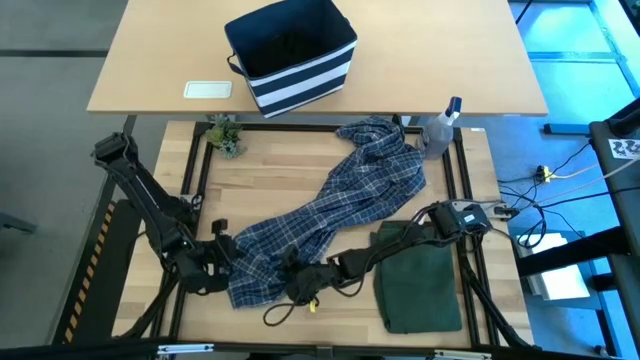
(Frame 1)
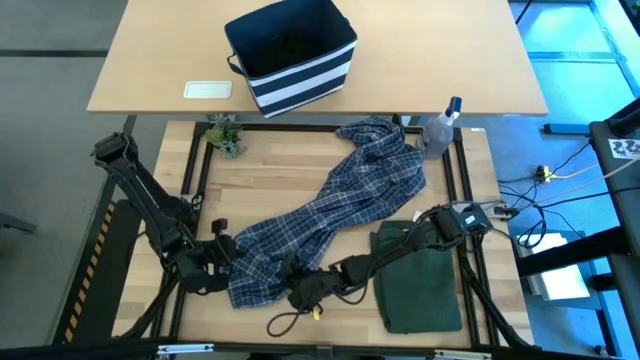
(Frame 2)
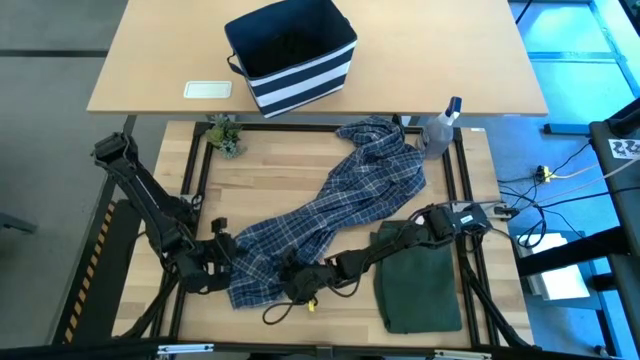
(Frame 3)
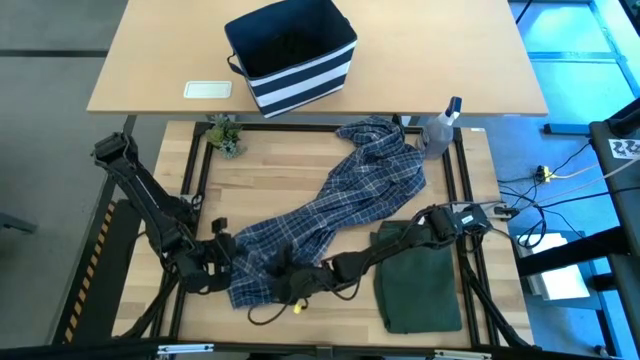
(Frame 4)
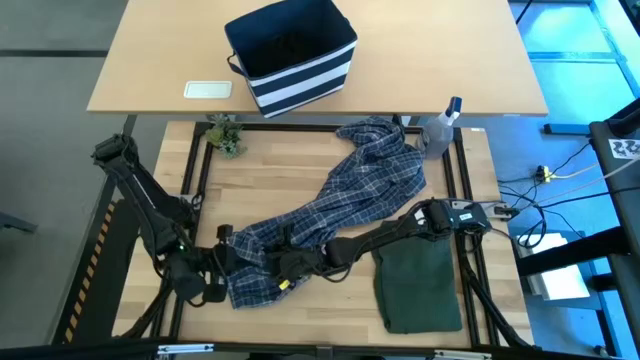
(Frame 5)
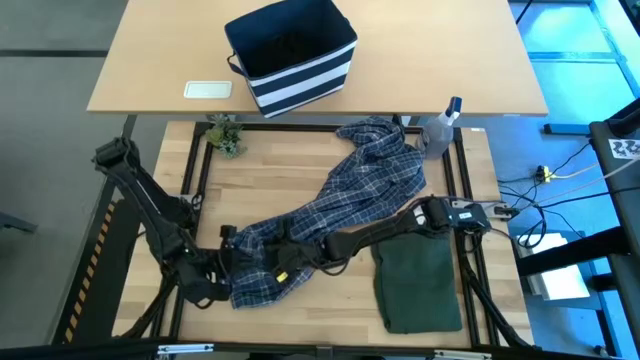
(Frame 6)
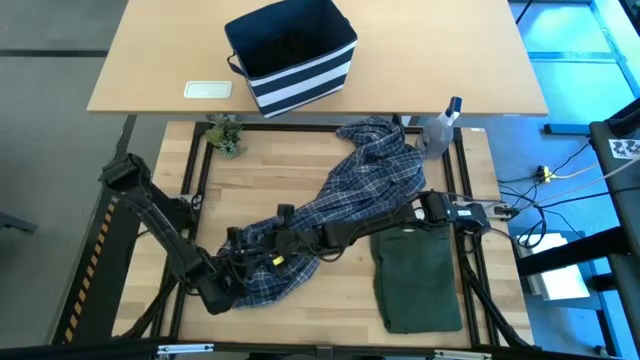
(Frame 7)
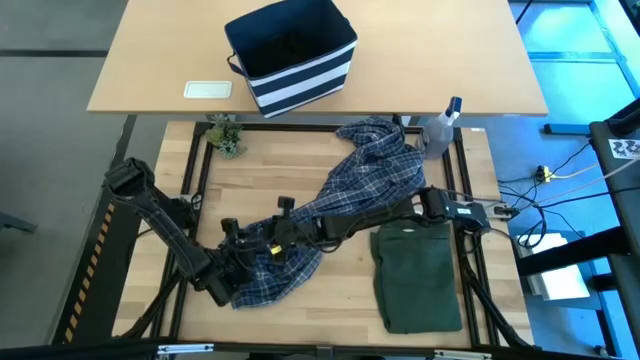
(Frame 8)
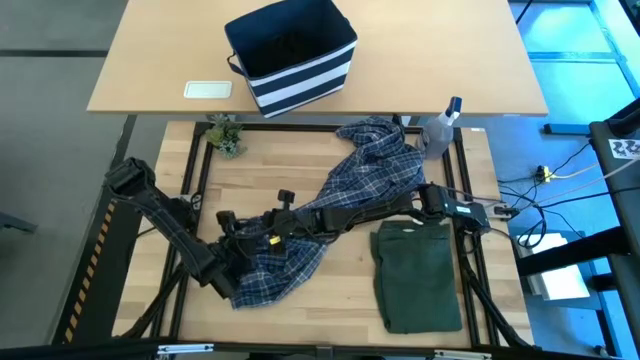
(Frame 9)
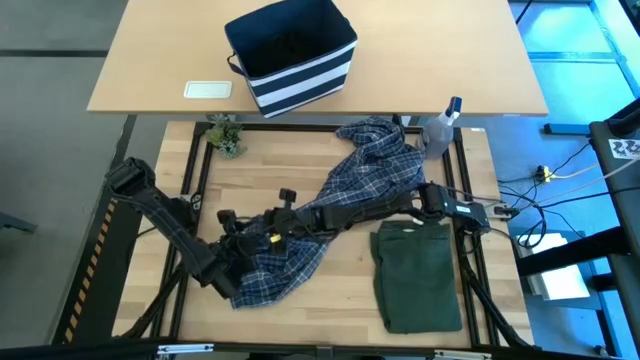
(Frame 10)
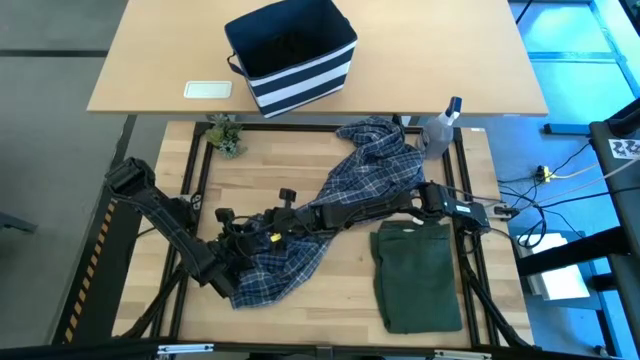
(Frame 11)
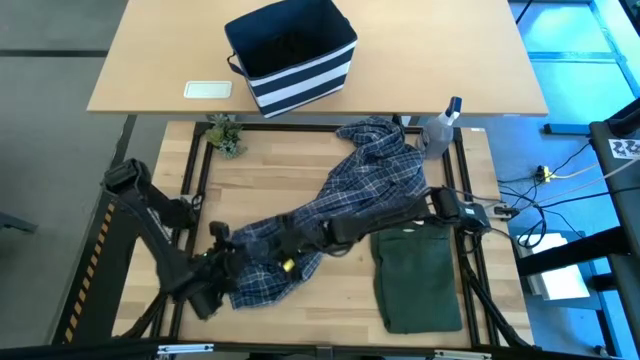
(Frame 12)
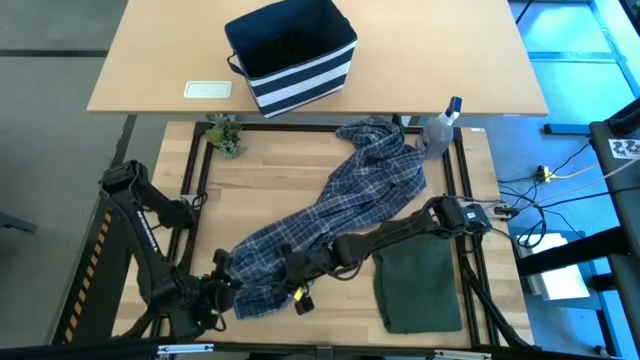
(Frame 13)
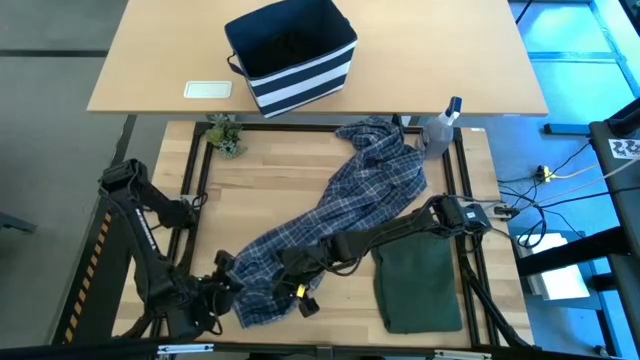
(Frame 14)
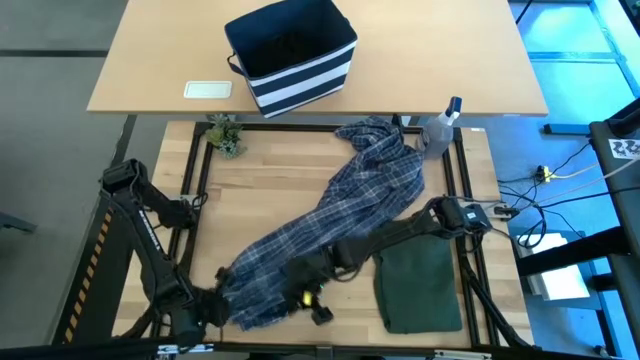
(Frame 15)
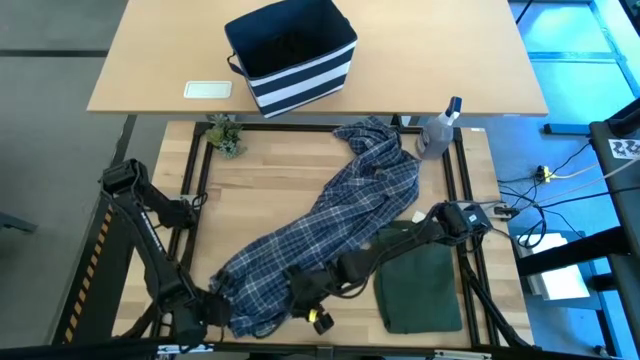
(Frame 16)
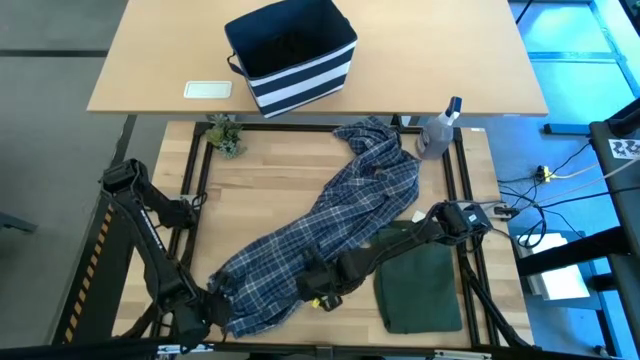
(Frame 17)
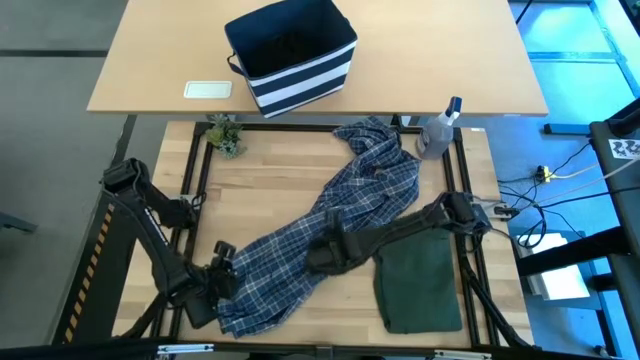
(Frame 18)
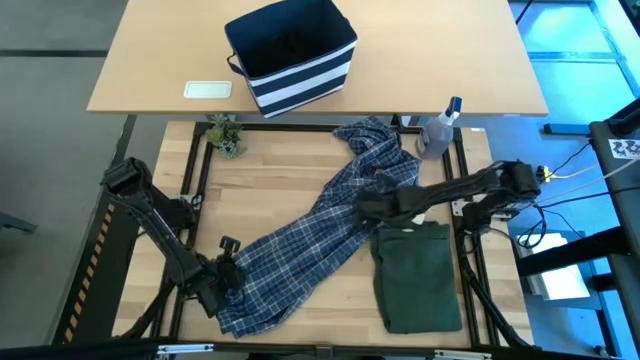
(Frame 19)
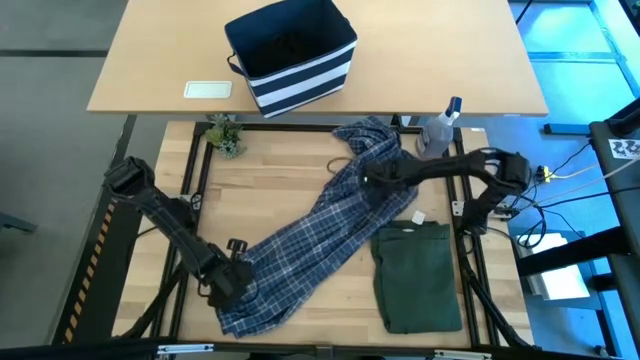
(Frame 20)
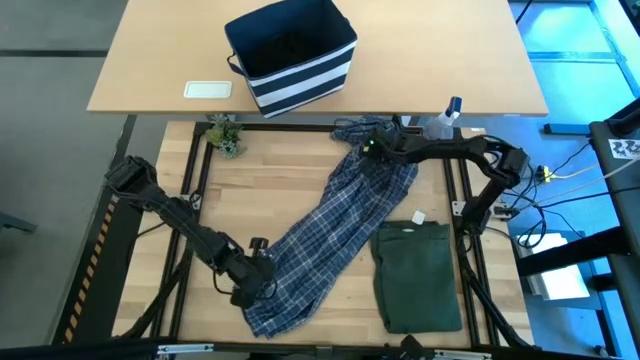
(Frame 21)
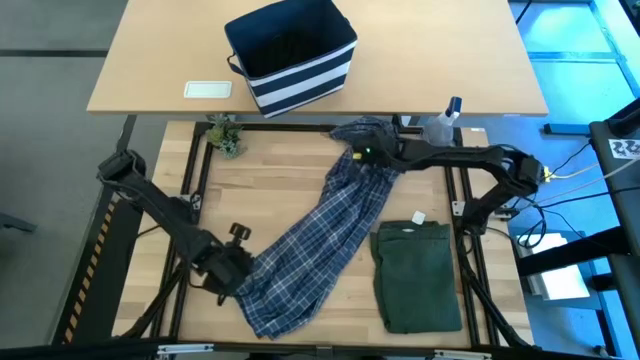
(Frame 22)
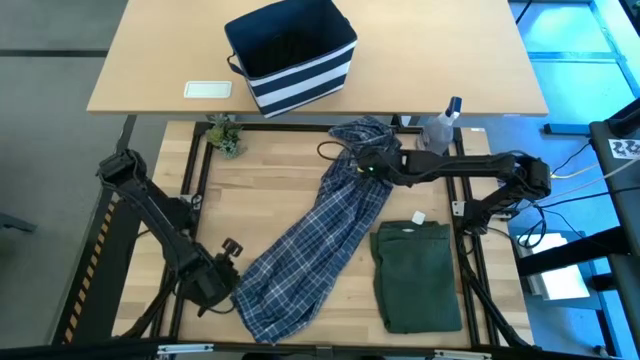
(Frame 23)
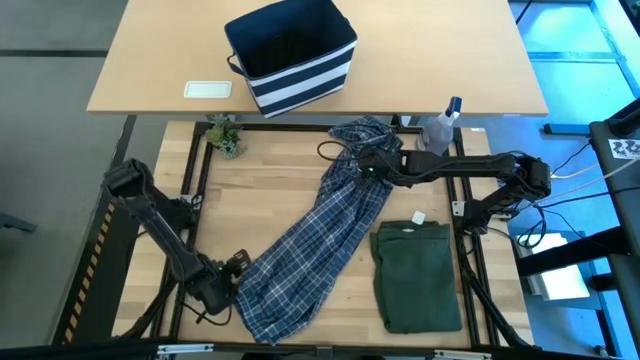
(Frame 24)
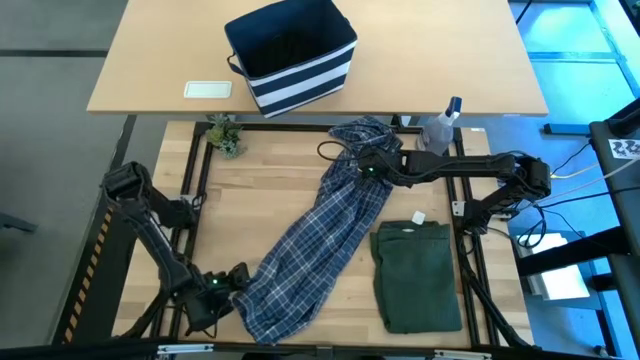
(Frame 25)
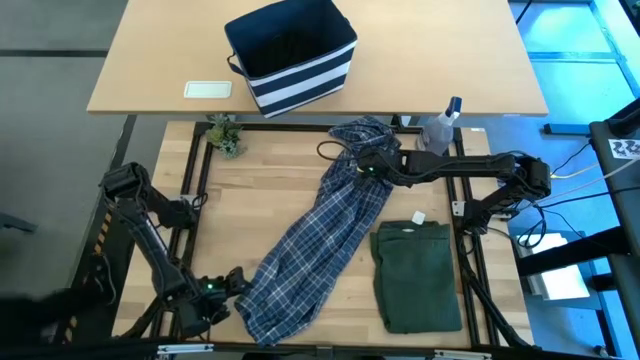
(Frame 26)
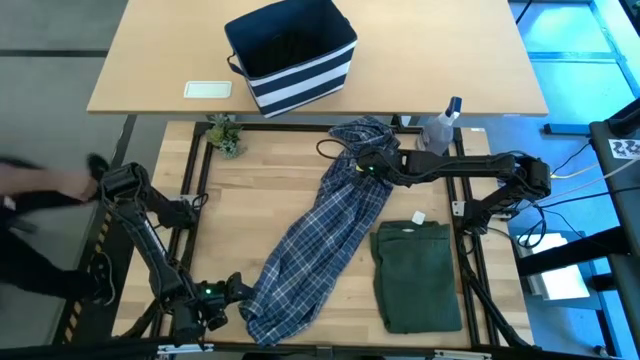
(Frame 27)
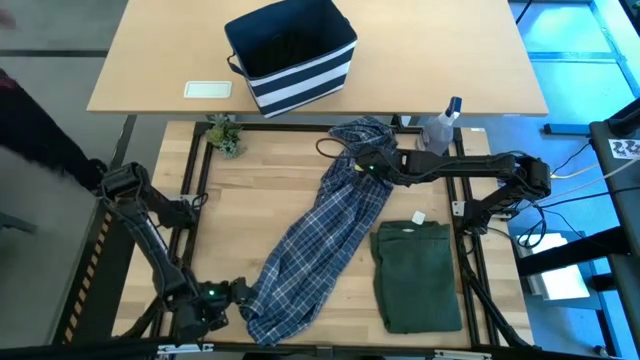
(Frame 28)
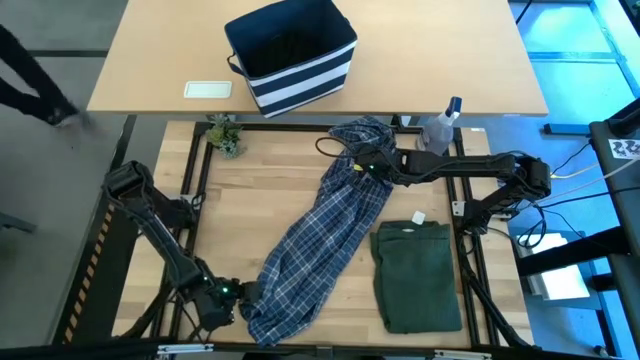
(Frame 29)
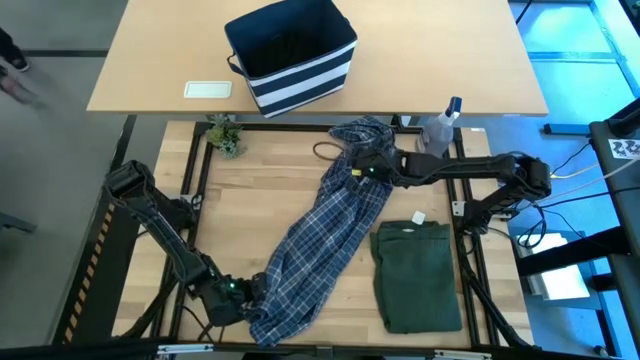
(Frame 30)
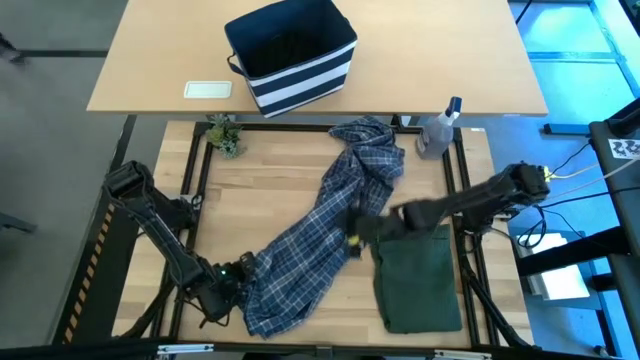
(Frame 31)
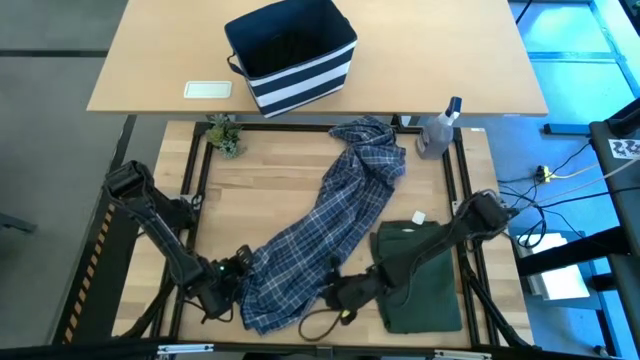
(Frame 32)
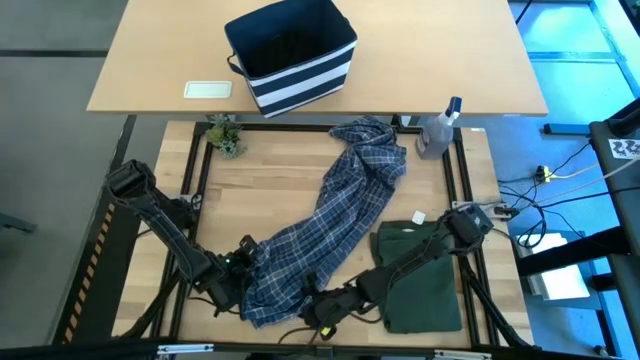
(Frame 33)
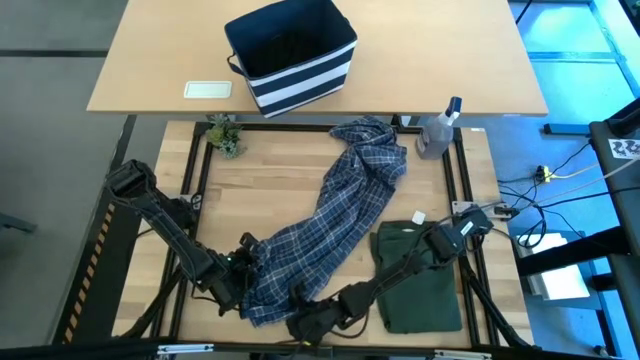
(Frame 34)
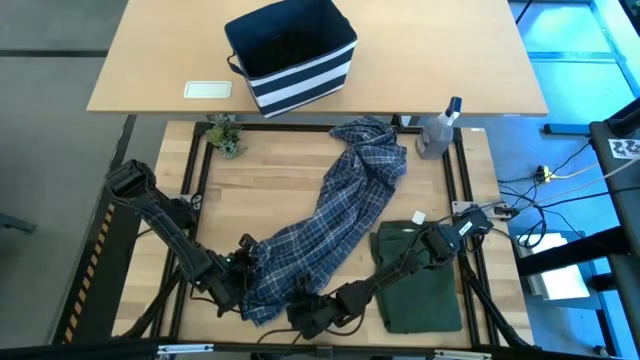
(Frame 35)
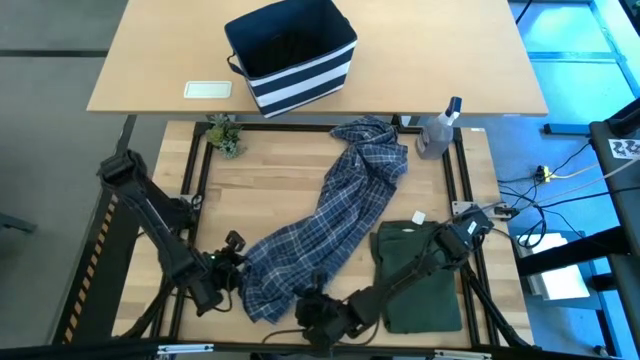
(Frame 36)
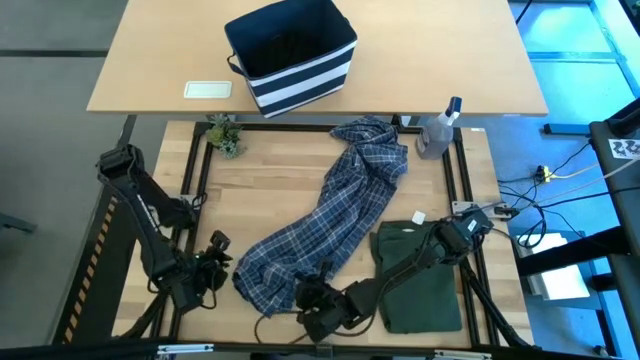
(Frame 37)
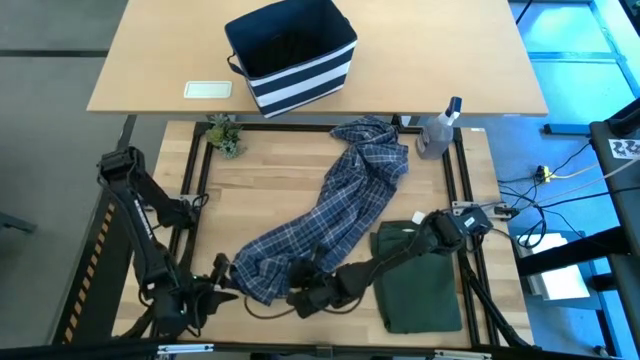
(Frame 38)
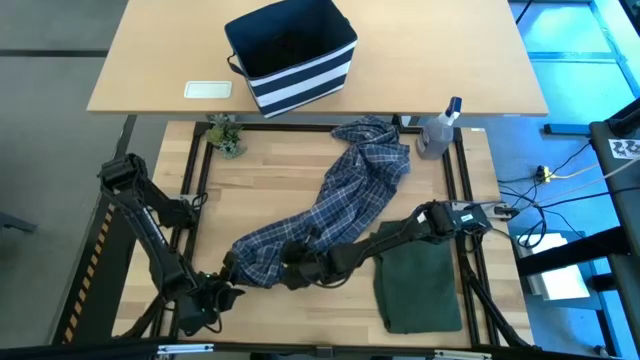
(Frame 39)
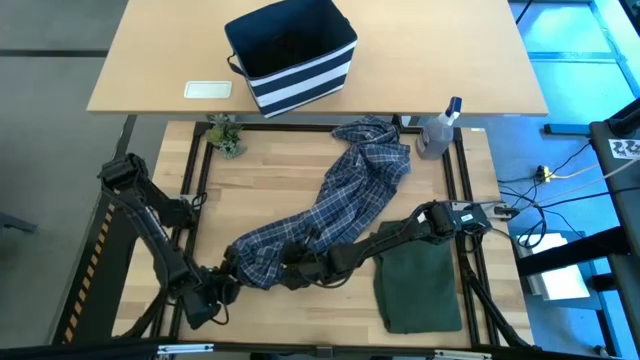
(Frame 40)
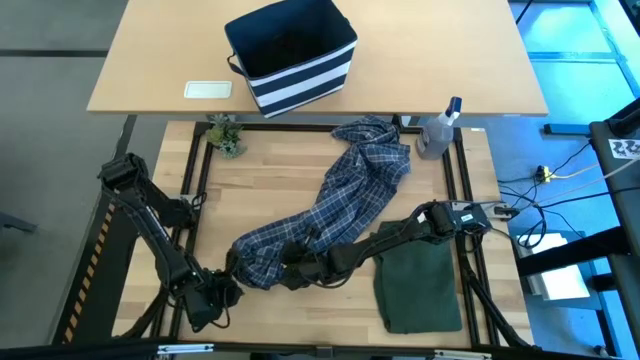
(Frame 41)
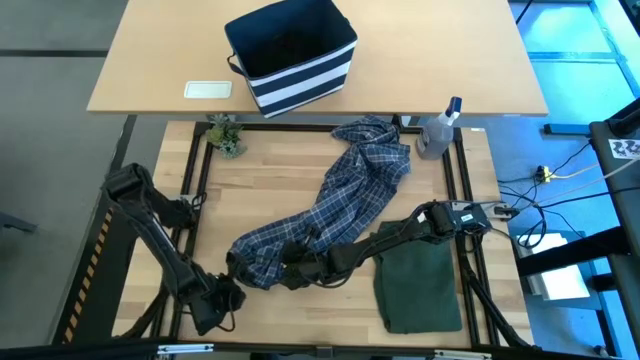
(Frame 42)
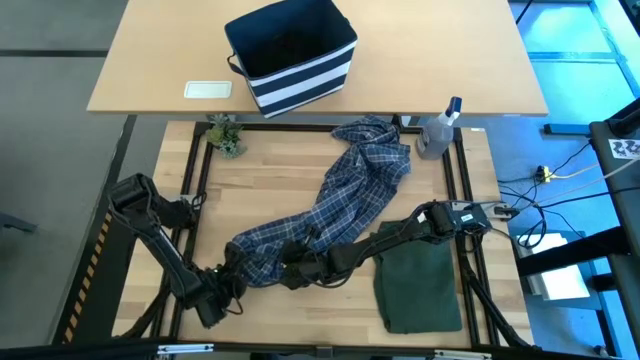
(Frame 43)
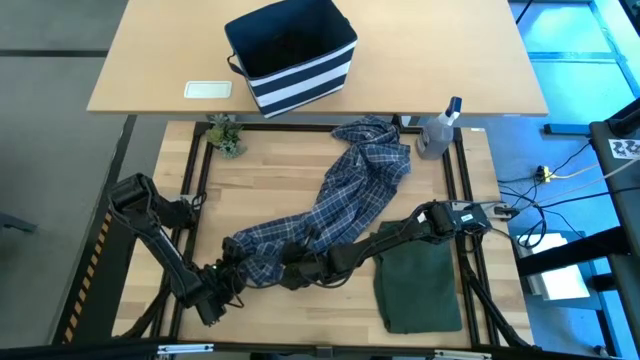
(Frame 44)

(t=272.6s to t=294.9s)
Task: Fold Laundry from Bin
Fold the blue checkered pants
